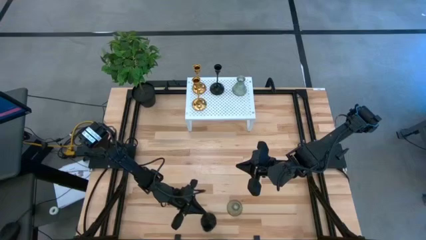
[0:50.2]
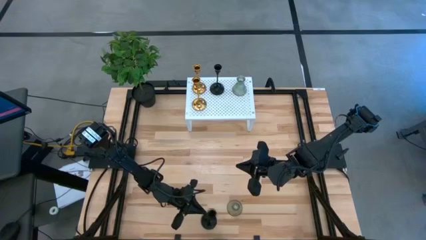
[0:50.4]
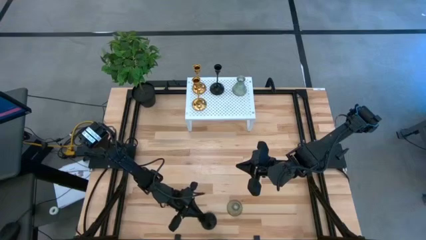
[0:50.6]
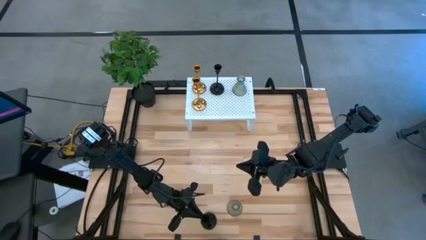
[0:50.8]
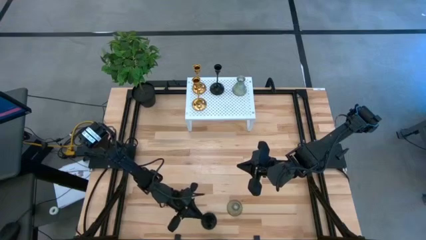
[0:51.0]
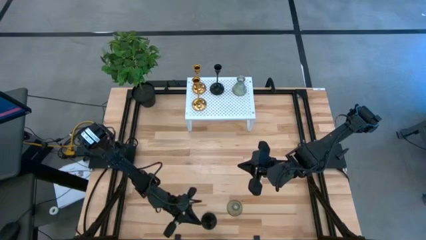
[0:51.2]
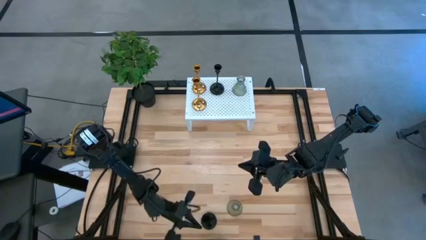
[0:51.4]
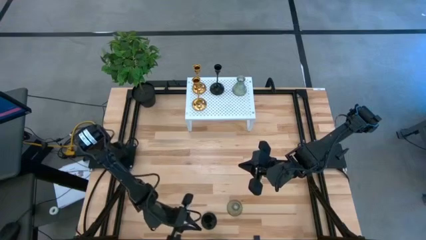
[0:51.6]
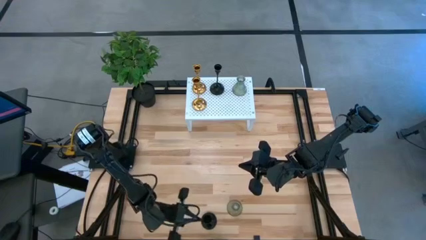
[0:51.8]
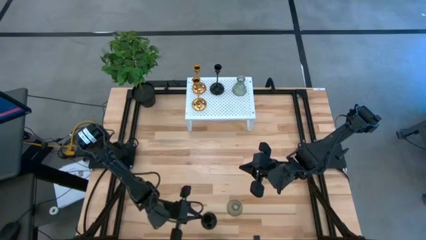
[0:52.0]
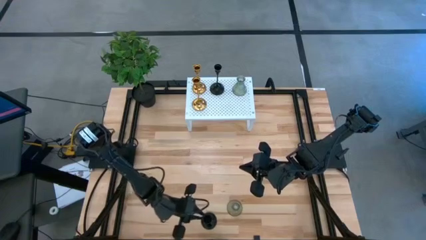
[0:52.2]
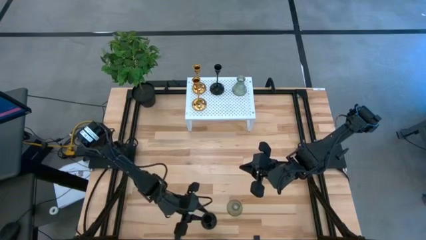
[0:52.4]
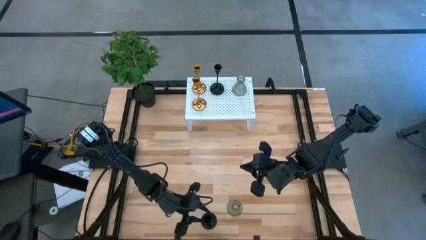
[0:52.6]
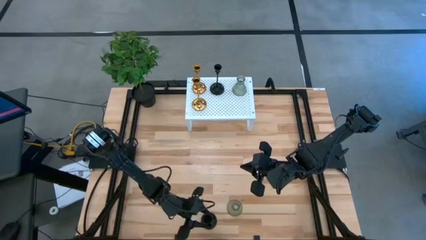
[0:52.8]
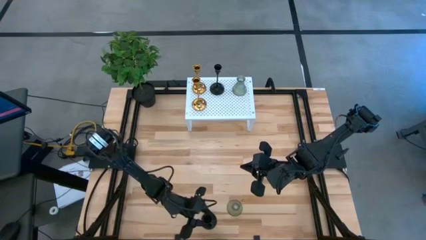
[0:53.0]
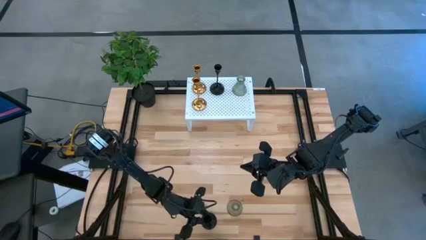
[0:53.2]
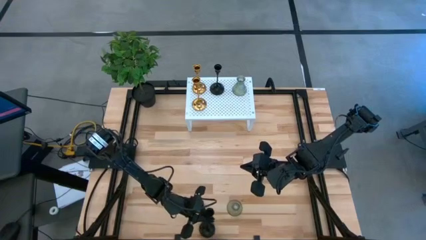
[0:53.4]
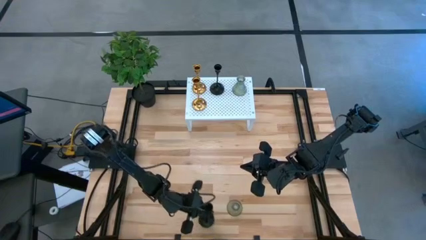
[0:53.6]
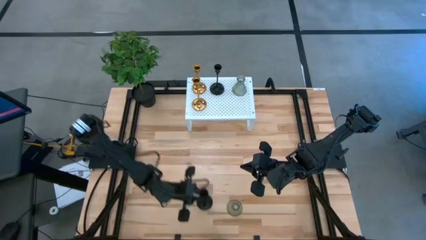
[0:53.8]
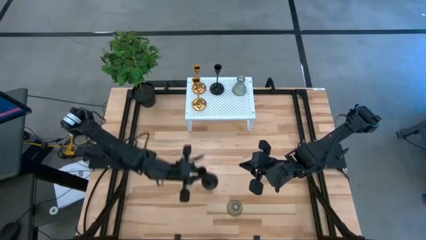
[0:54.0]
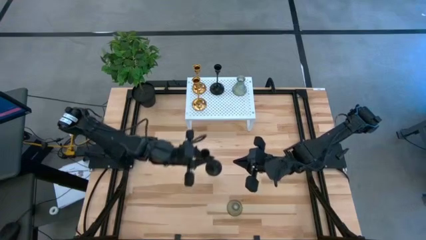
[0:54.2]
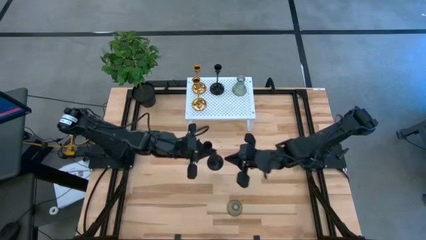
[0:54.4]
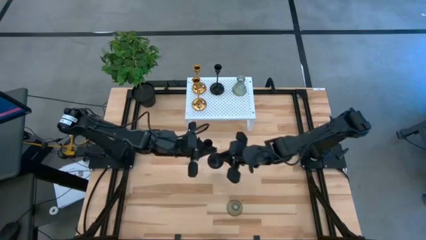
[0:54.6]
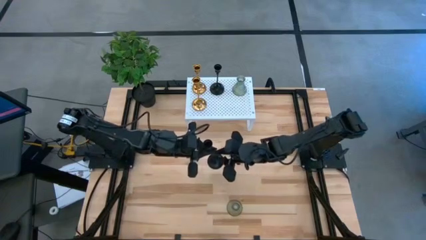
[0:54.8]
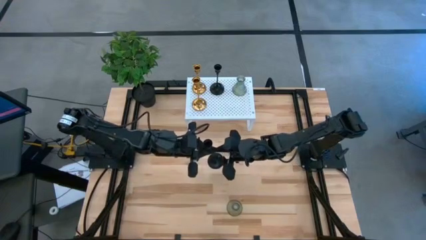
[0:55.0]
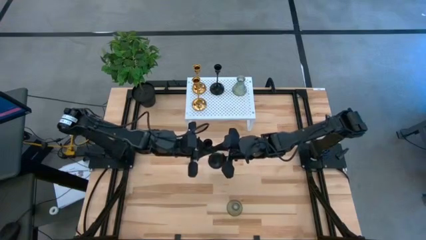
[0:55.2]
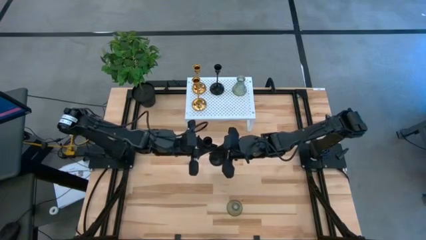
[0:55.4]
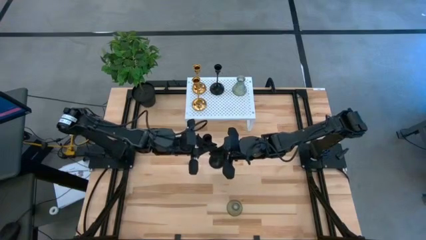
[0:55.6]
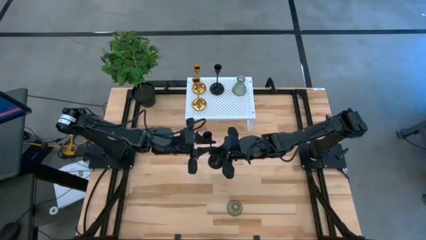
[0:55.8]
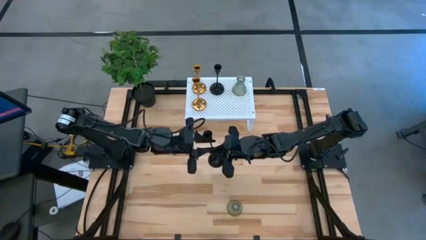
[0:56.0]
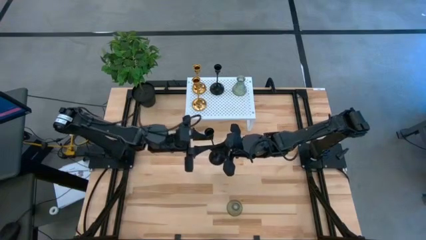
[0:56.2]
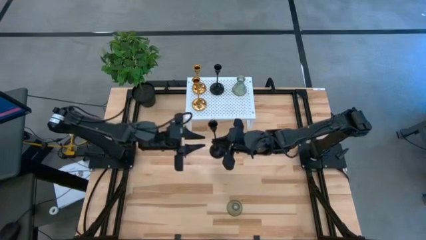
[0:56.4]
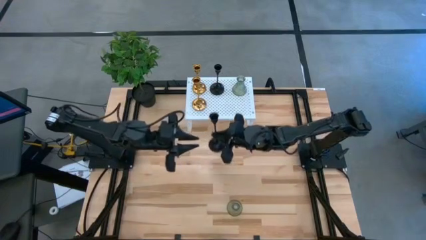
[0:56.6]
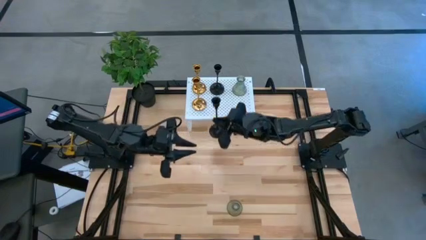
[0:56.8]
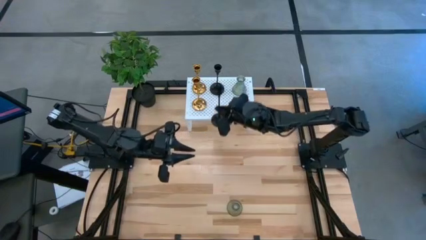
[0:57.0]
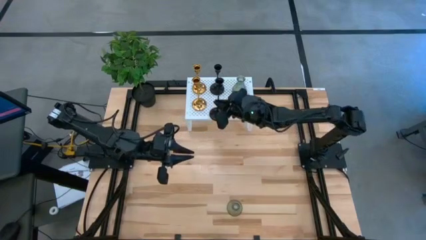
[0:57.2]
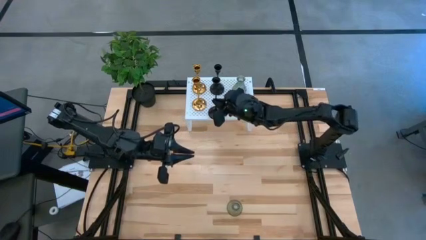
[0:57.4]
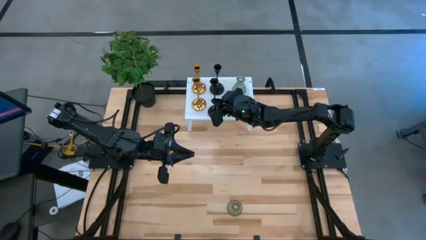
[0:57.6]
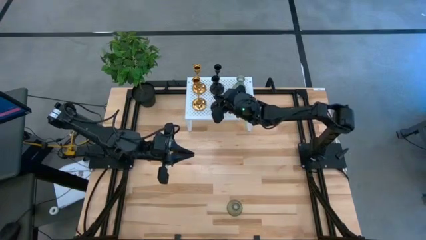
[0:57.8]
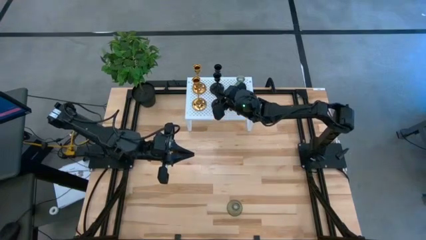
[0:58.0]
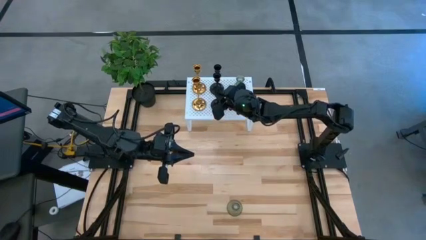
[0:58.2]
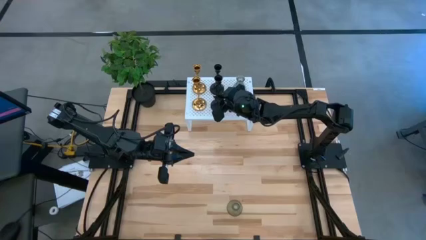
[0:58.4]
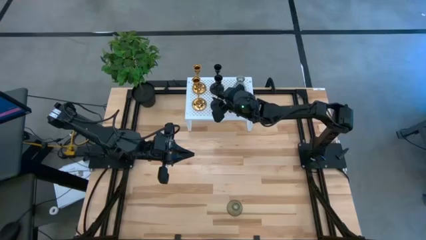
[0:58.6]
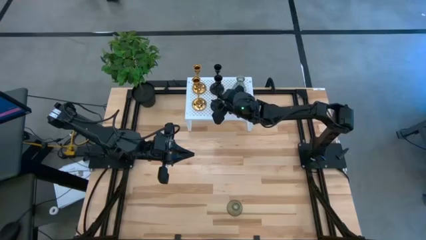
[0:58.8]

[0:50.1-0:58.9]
Task: Pick & Place candle stick holders
Put the black candle holder on the shelf aligned with the other black candle holder

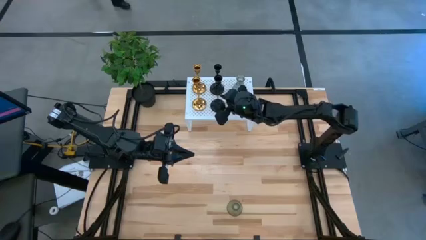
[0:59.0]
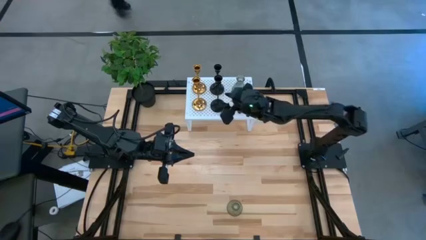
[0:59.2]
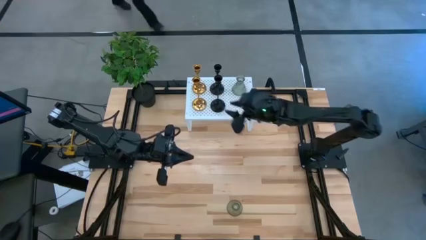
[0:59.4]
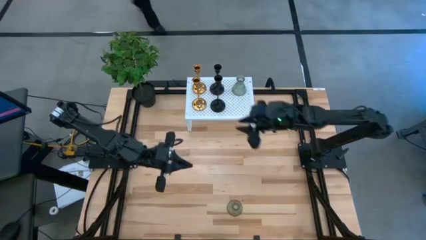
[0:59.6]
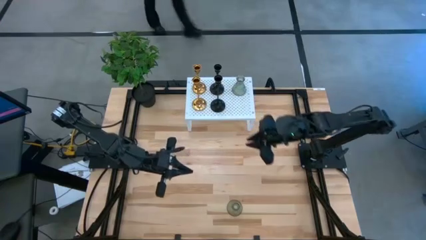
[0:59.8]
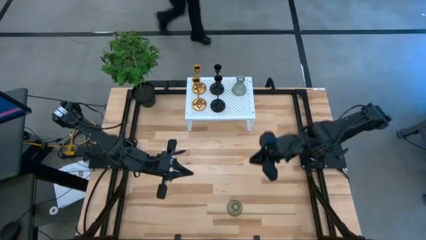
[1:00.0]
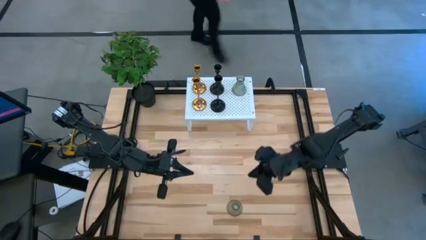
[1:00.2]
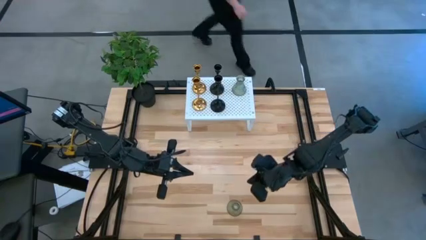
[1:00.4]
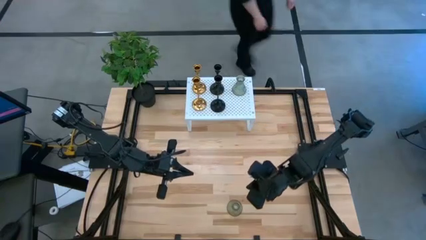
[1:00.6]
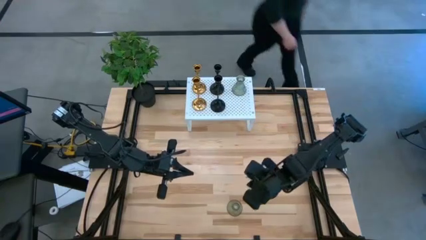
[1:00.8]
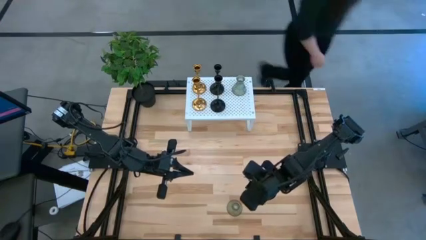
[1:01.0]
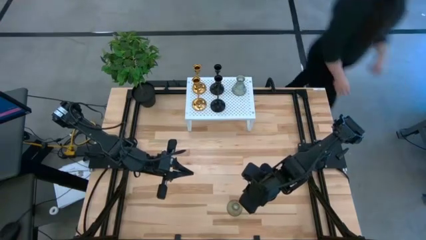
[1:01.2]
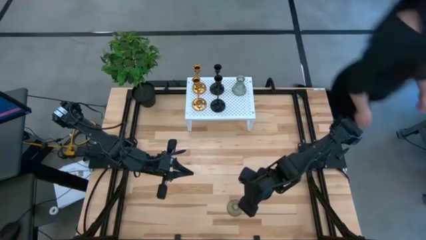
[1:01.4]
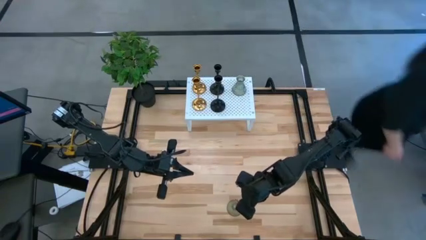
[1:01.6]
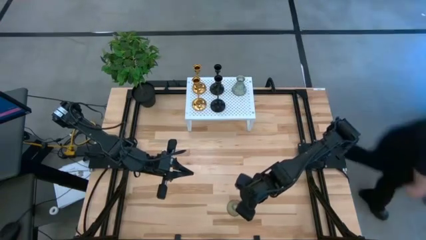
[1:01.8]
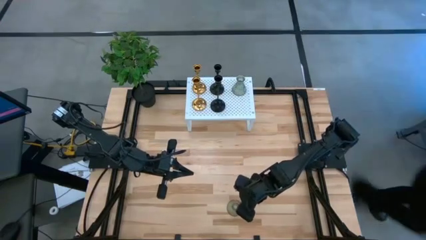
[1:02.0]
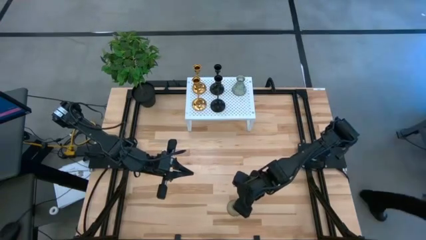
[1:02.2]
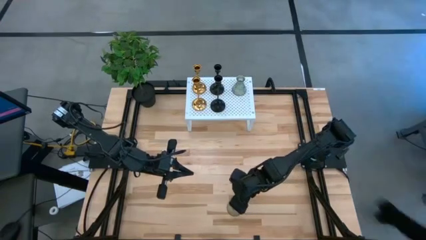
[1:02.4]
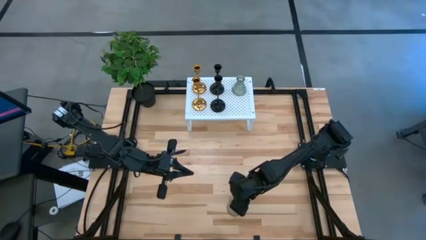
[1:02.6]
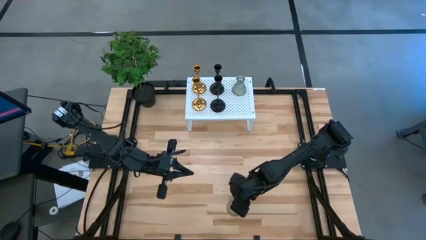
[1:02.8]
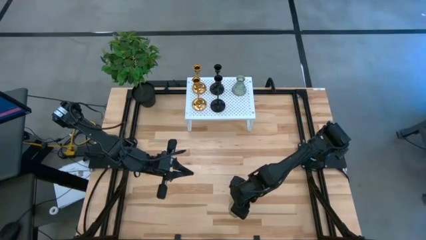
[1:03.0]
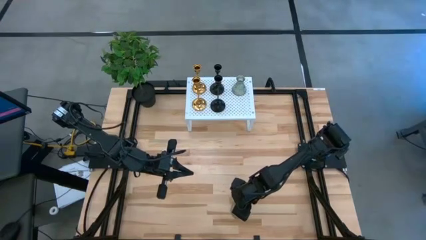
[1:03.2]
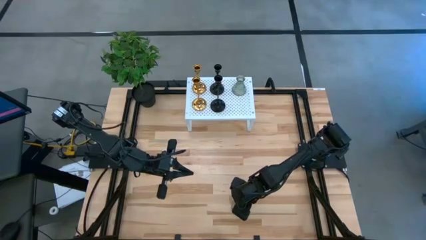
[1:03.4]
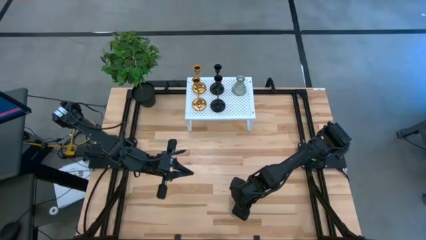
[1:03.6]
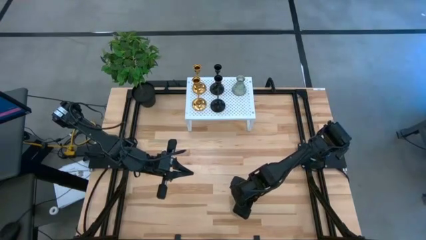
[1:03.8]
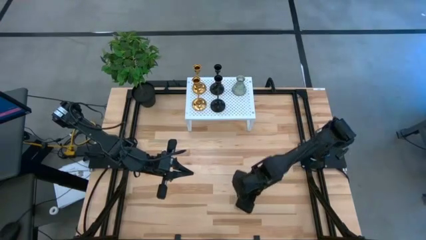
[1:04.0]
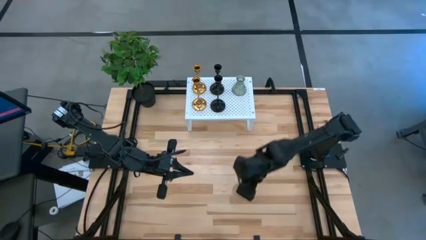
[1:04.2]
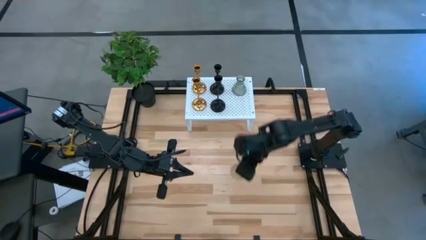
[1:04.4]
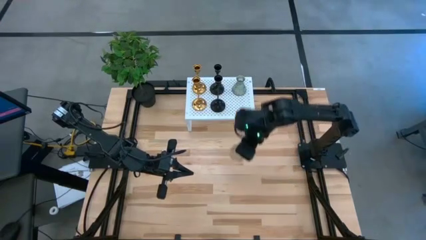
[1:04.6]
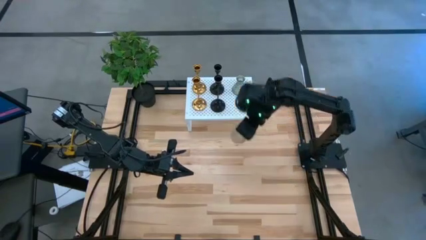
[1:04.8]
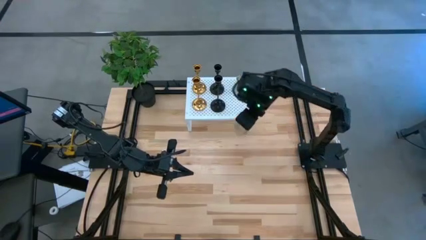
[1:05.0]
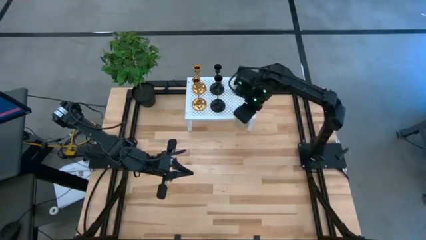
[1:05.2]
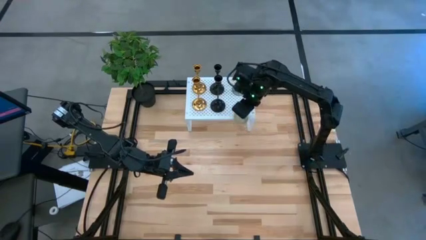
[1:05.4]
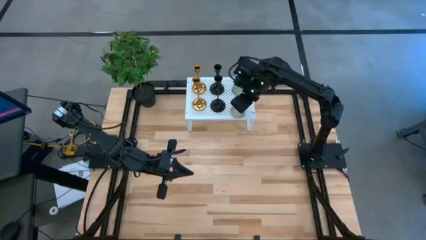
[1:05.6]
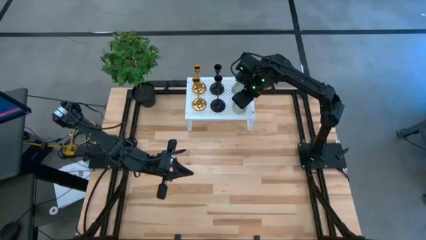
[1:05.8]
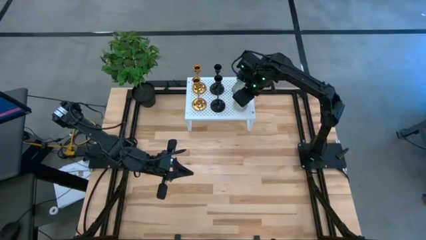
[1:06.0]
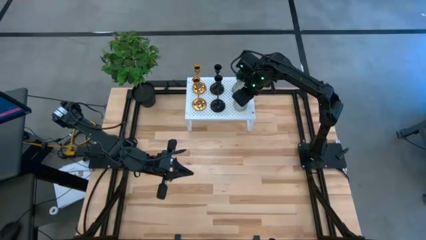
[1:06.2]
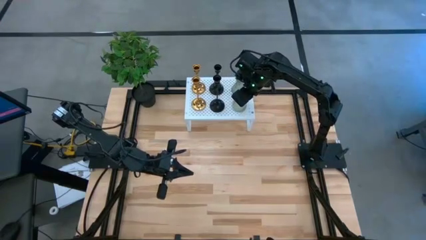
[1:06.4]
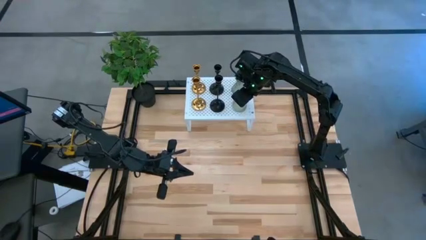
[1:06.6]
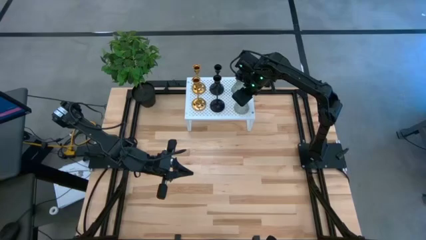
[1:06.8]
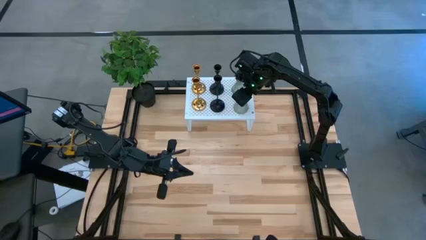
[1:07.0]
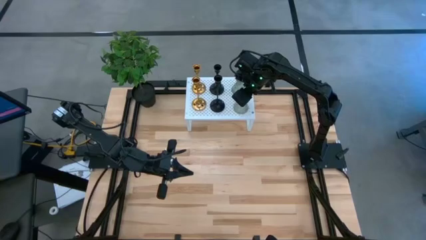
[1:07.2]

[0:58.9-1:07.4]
Put the transparent candle holder on the shelf aligned with the other transparent candle holder
